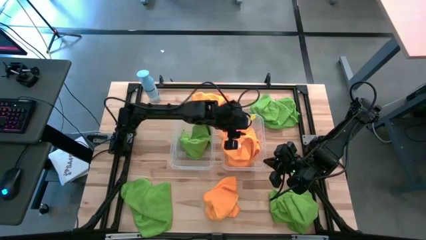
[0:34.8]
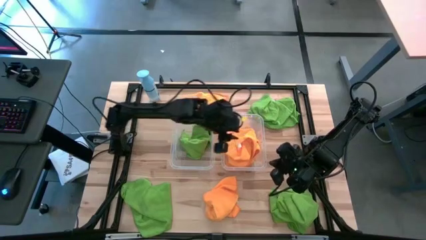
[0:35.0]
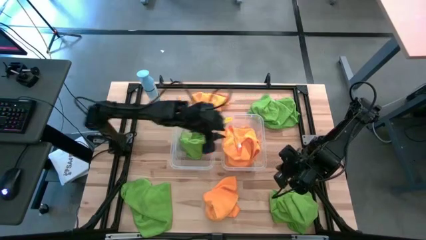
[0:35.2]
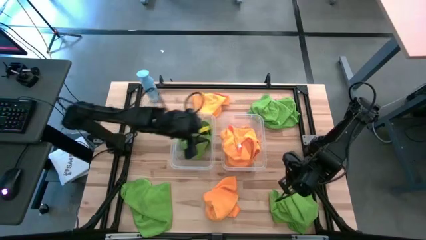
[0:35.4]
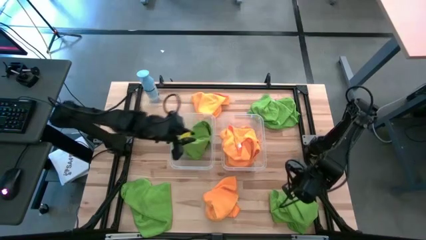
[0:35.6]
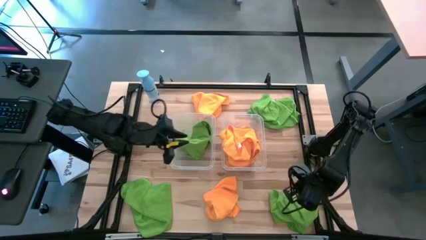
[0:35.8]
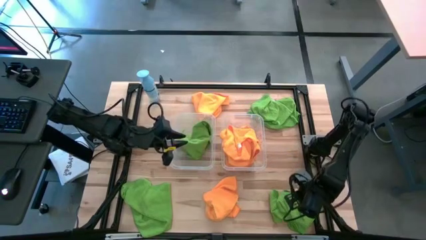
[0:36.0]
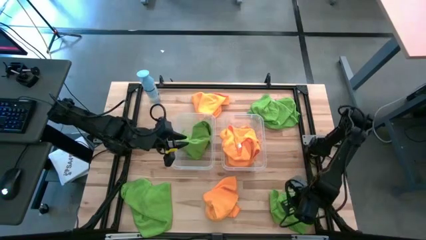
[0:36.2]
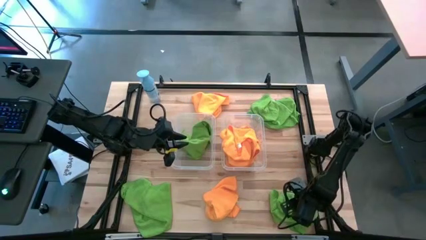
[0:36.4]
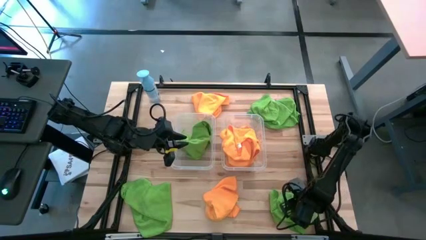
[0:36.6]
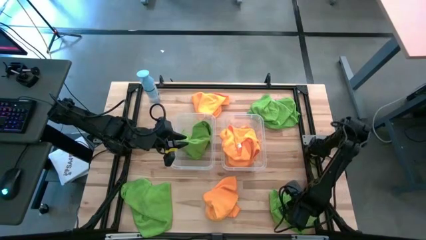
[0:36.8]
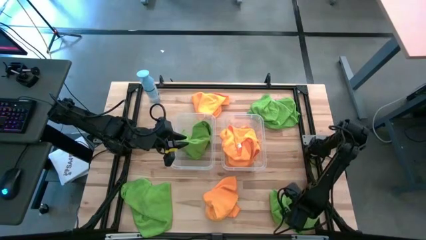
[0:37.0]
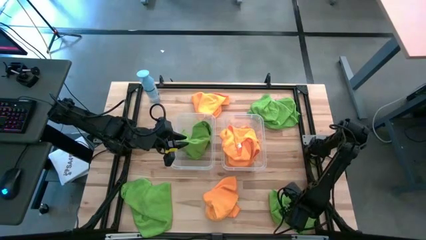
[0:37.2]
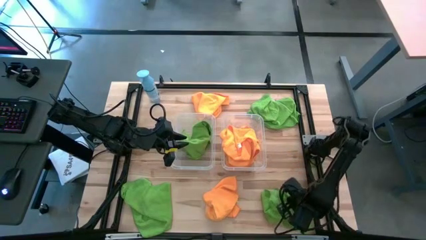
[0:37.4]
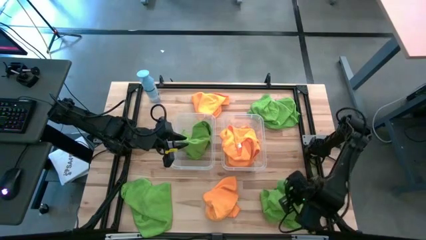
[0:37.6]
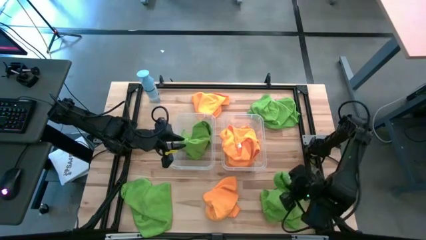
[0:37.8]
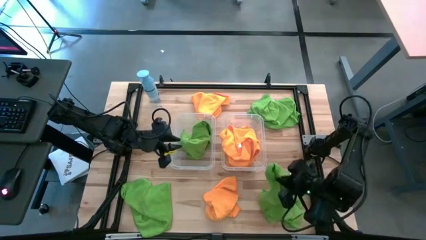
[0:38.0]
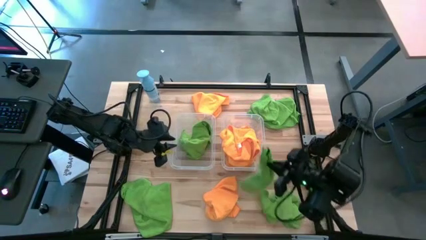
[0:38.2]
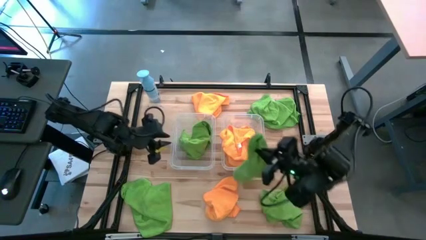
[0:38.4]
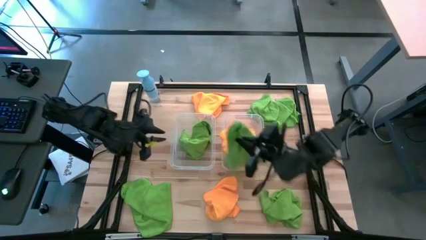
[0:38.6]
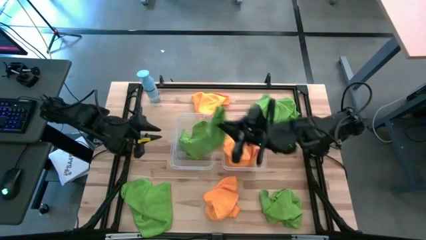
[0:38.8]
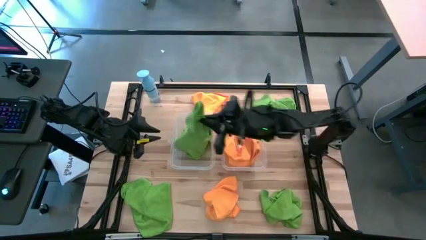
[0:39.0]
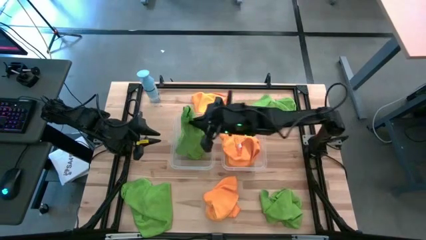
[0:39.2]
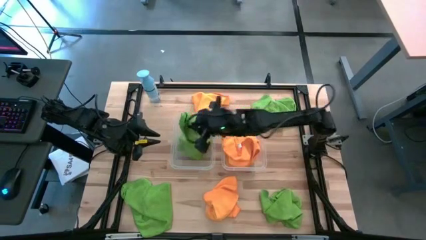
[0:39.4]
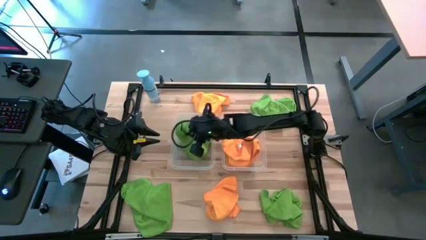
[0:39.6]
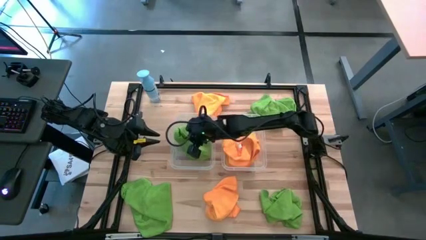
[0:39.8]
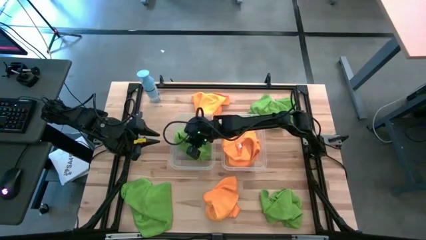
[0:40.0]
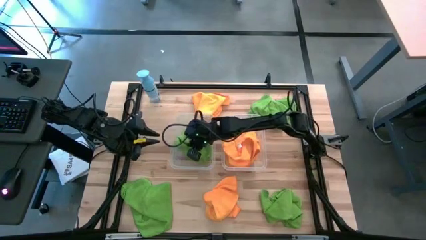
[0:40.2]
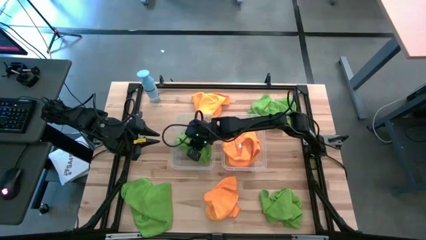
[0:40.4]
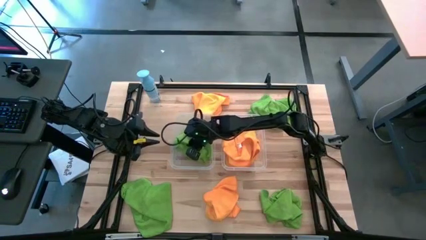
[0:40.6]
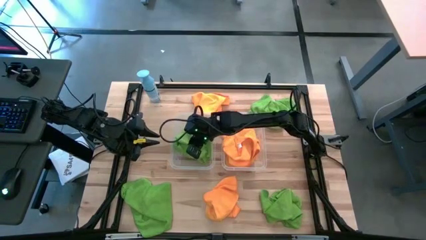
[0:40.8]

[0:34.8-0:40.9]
Task: Sort microfiber towel by color & place in baskets
Put the green towel into the left transparent bin

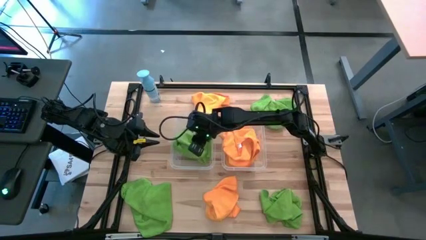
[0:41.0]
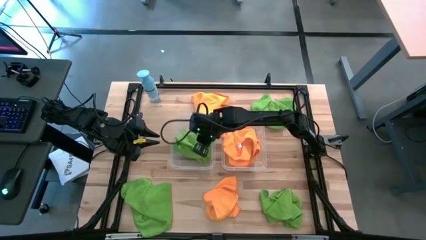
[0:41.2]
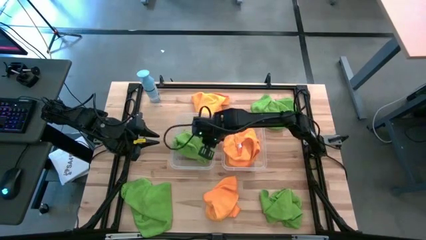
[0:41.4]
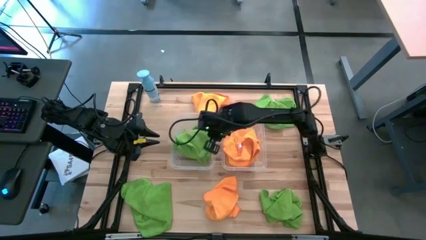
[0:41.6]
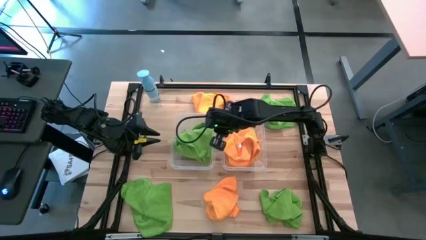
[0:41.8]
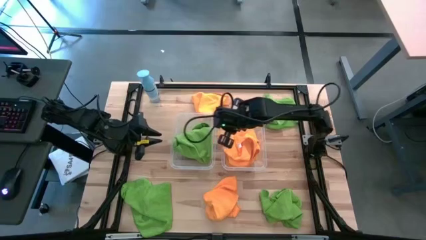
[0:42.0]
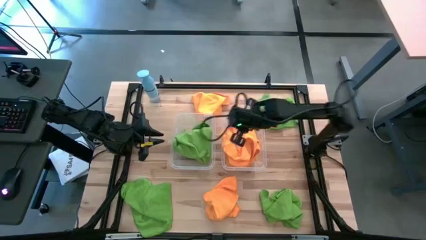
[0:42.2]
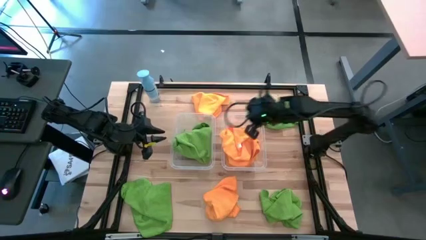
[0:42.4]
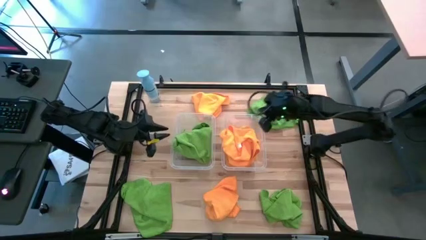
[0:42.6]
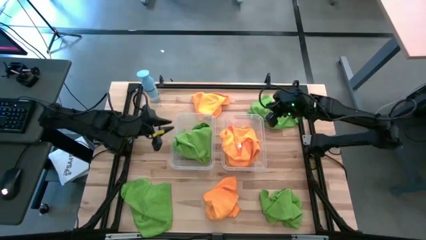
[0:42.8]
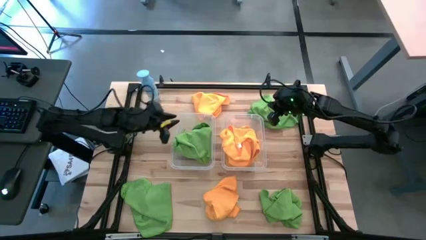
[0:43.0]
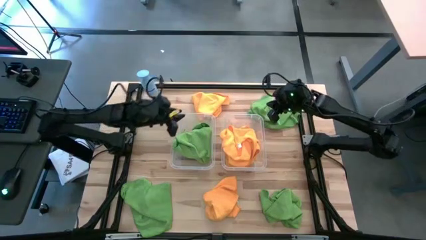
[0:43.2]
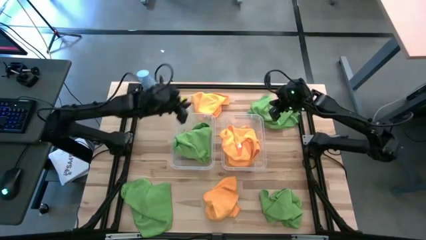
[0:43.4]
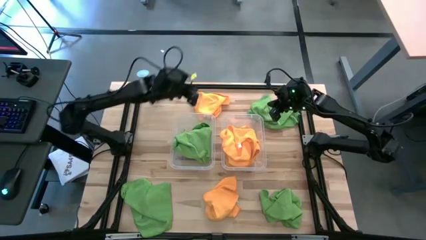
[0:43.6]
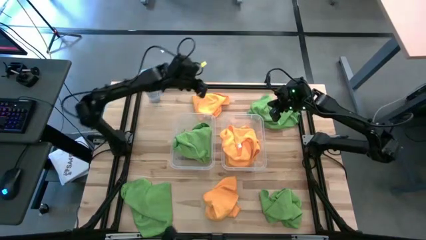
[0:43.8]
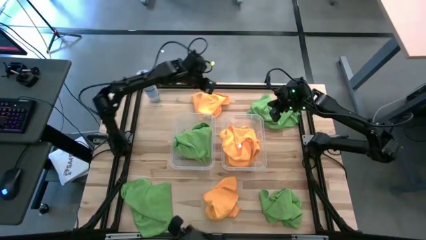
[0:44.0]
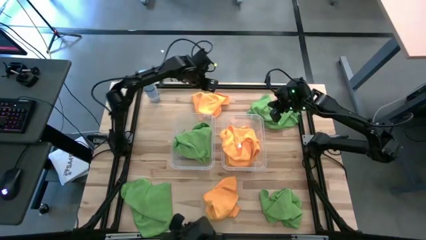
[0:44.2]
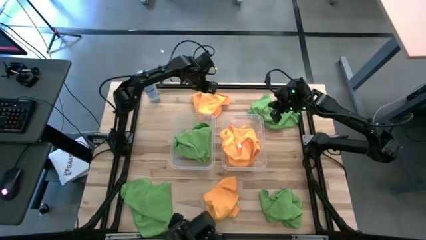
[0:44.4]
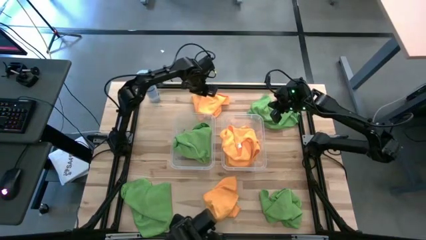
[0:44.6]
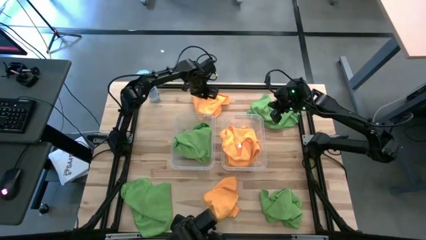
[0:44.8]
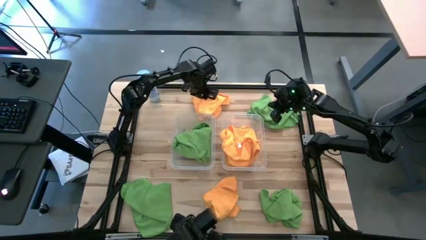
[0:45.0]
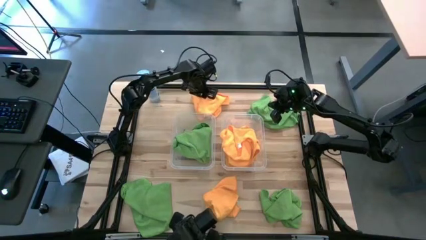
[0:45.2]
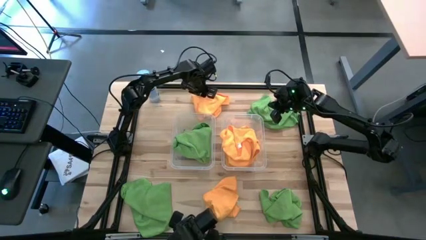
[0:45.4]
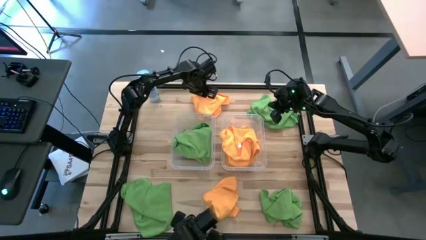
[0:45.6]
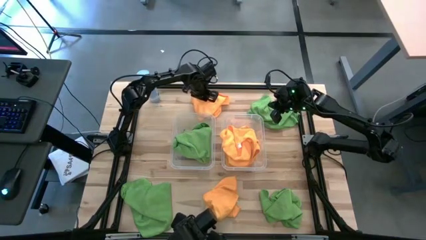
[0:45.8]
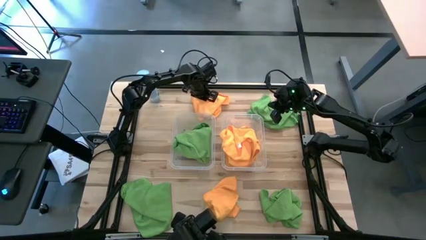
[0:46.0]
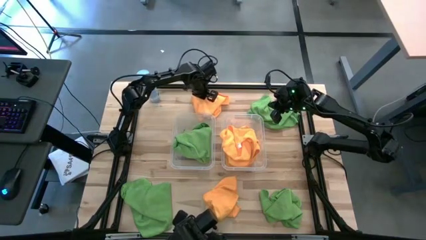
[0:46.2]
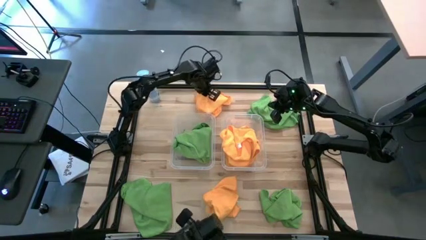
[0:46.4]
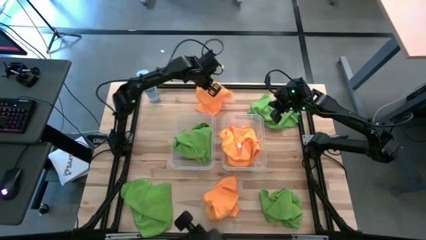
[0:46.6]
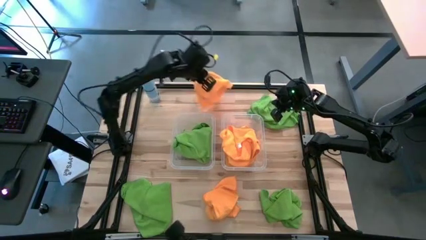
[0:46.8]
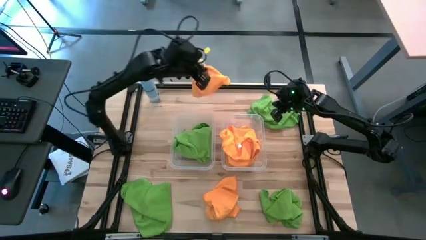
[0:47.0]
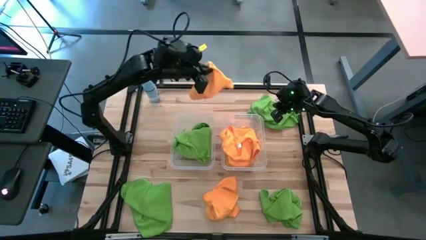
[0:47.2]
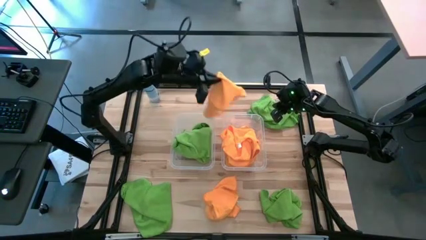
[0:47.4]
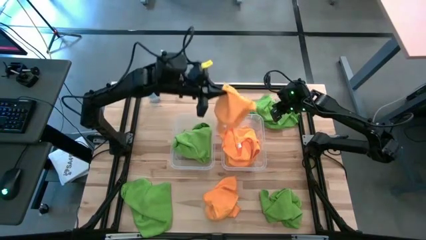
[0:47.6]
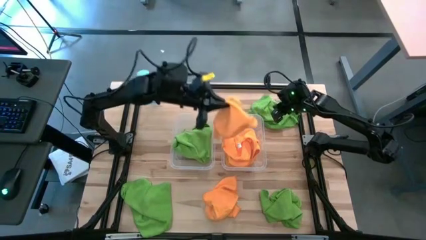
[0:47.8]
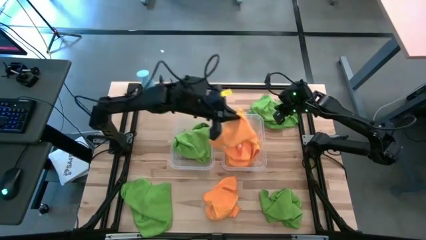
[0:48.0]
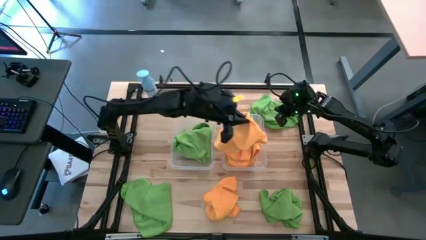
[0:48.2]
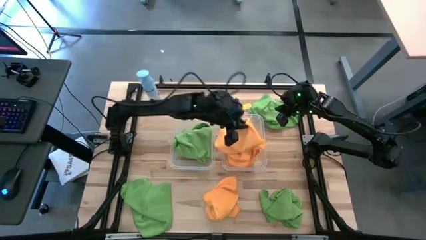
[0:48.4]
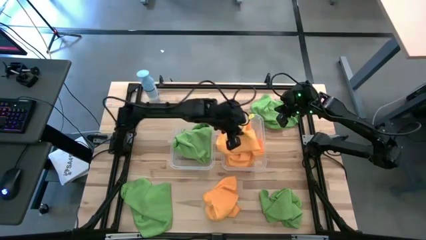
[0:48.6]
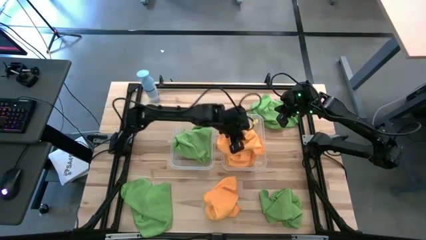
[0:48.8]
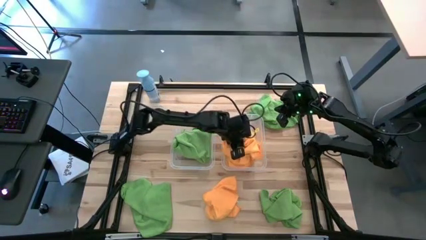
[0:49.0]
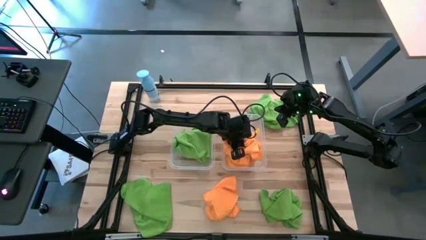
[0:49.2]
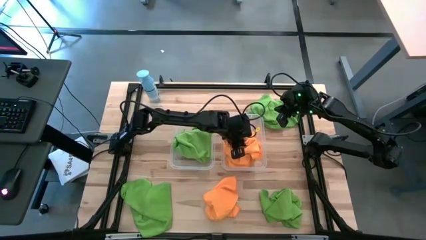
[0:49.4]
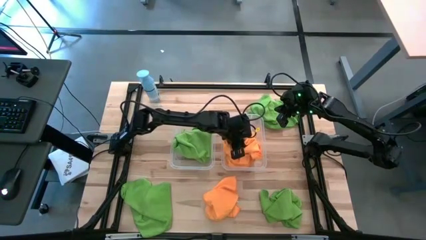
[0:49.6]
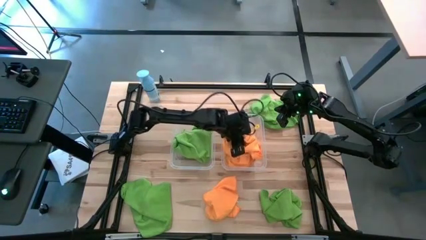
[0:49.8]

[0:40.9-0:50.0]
Put the orange towel into the right transparent bin

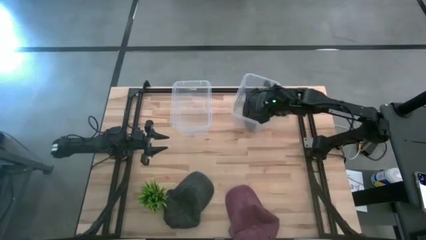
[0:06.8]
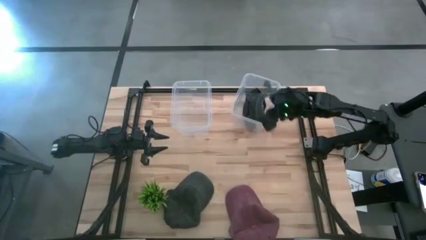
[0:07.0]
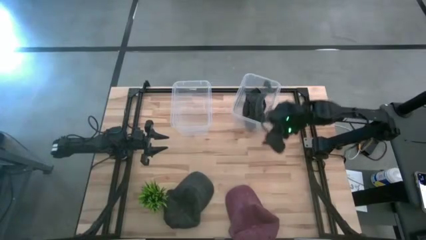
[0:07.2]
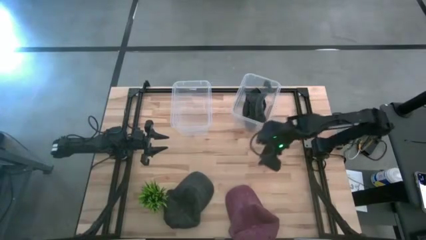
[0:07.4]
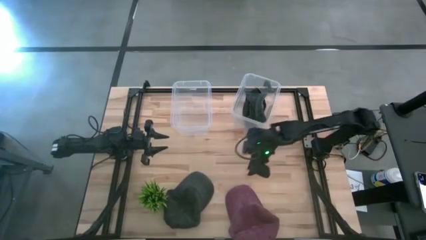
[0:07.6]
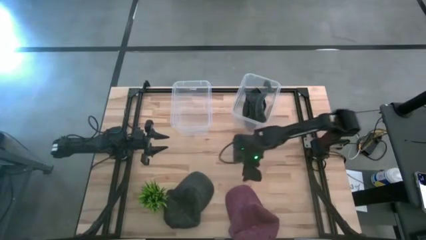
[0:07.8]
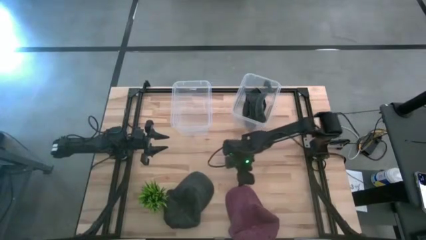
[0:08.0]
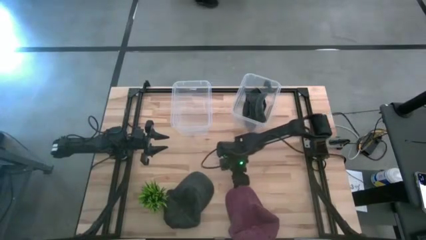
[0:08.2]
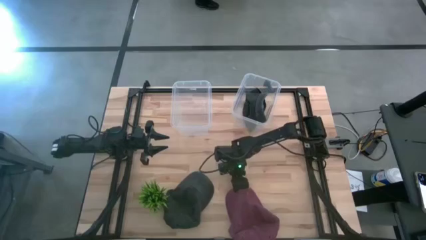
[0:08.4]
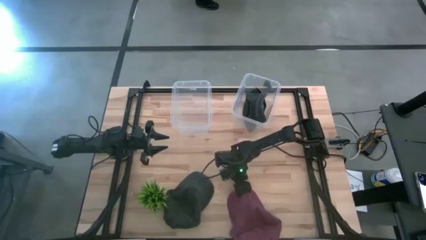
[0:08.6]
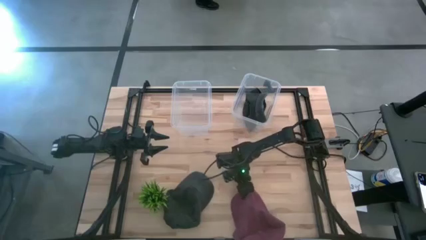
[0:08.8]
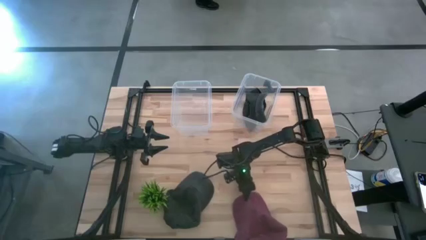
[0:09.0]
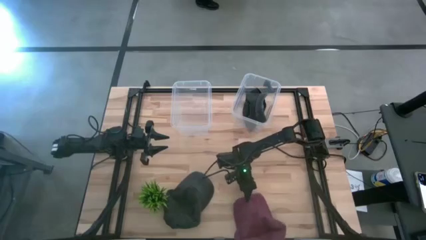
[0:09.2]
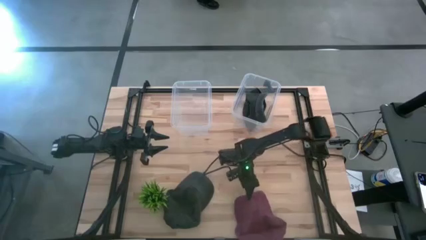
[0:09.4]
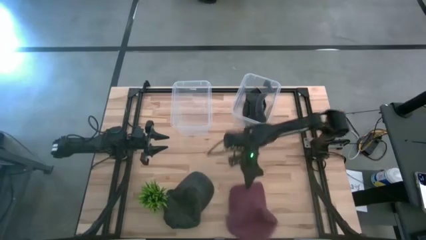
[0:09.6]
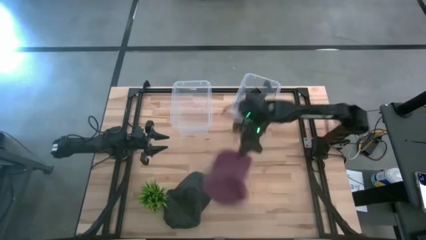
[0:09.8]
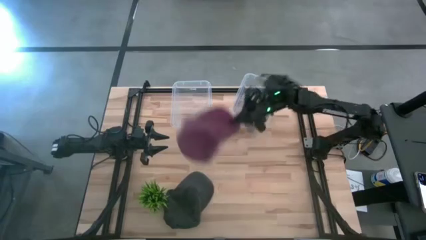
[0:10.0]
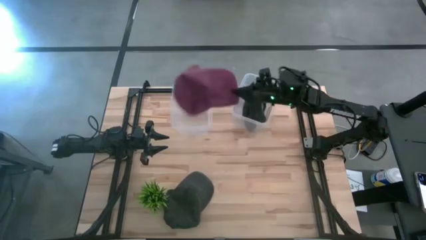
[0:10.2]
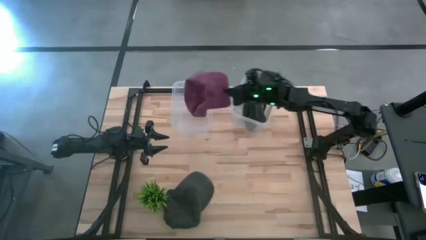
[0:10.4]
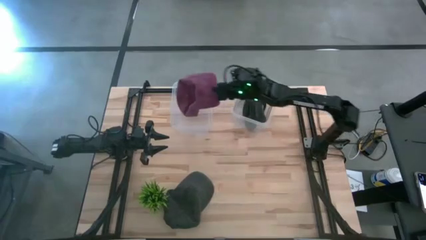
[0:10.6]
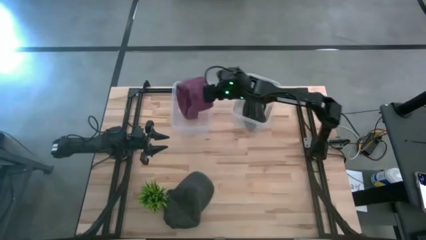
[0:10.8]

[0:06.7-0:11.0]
Task: Pick & Place hat
Put the red cap into the left transparent bin
